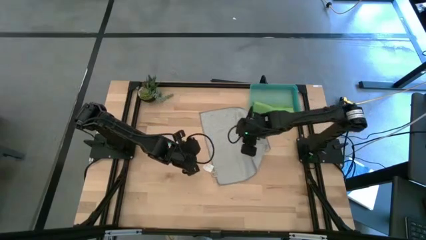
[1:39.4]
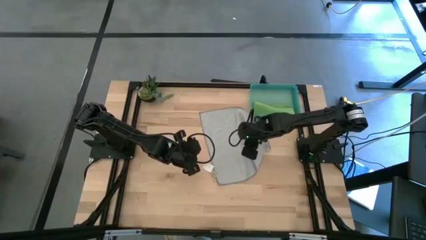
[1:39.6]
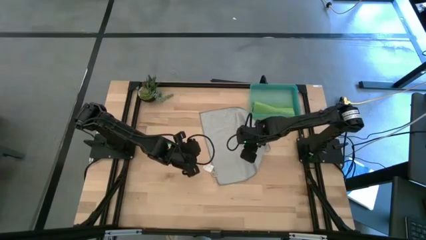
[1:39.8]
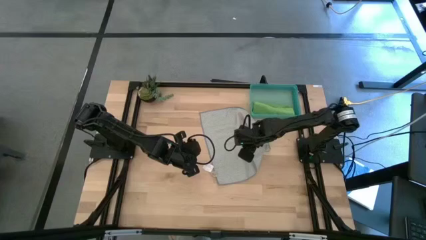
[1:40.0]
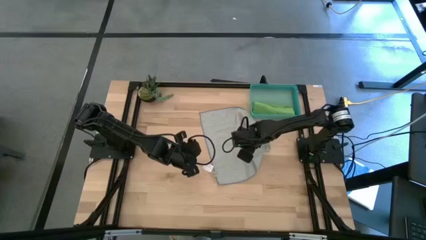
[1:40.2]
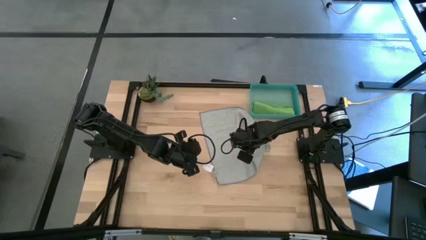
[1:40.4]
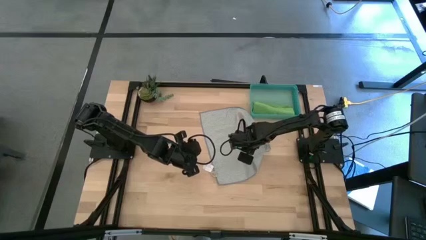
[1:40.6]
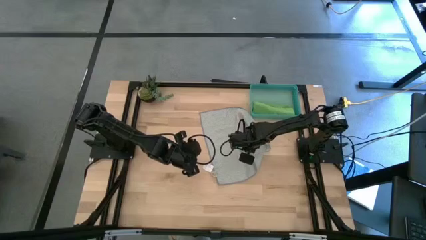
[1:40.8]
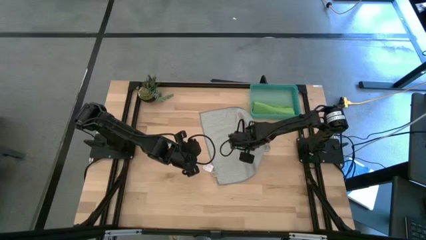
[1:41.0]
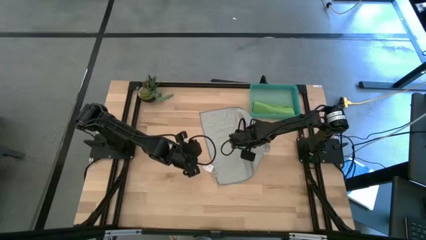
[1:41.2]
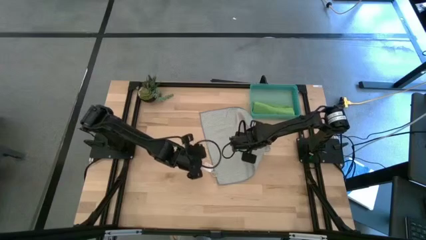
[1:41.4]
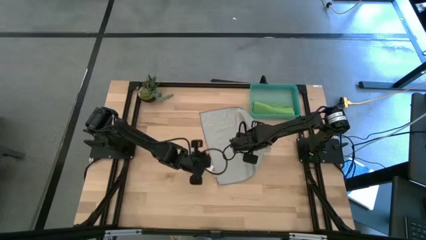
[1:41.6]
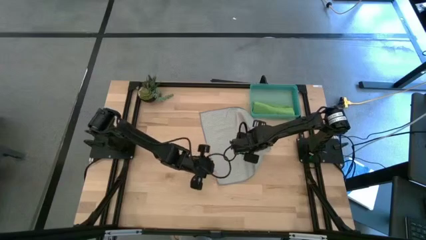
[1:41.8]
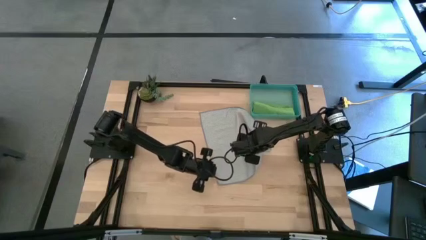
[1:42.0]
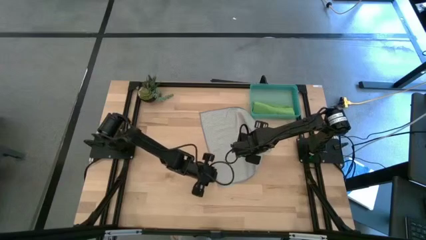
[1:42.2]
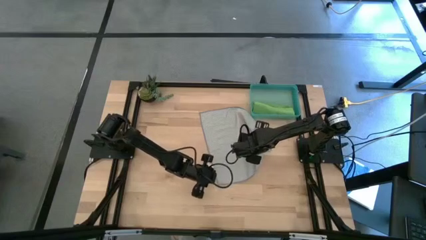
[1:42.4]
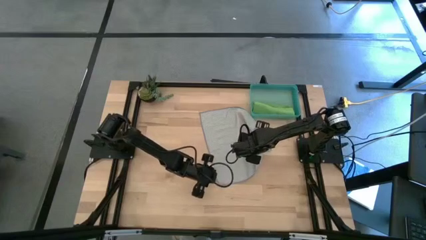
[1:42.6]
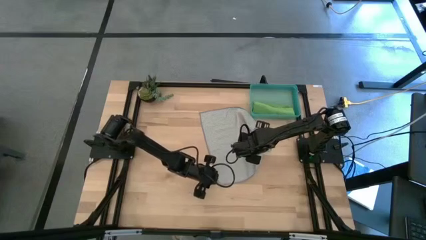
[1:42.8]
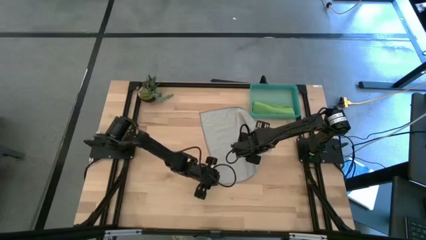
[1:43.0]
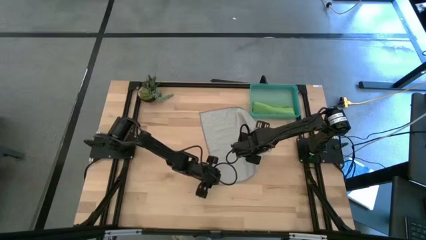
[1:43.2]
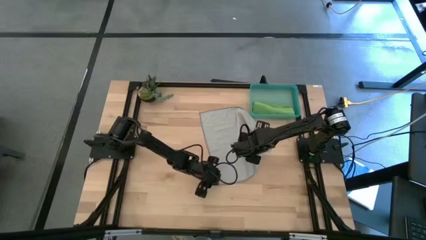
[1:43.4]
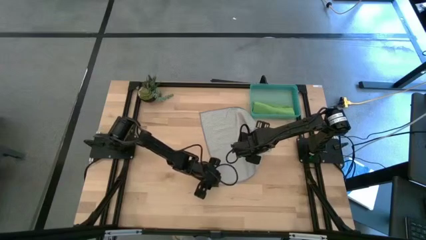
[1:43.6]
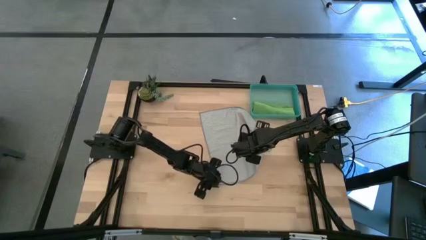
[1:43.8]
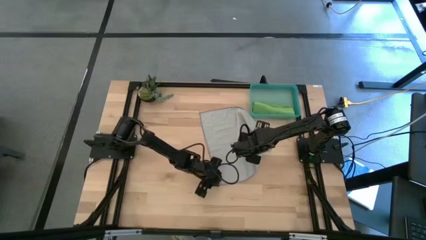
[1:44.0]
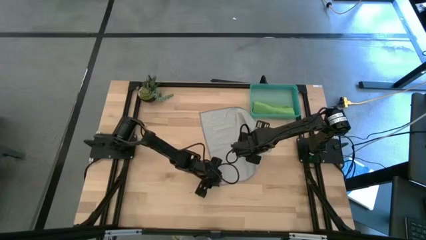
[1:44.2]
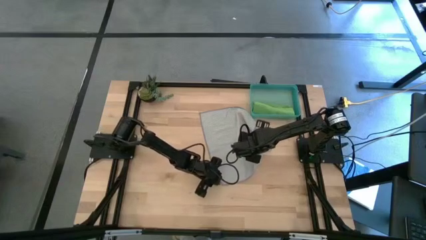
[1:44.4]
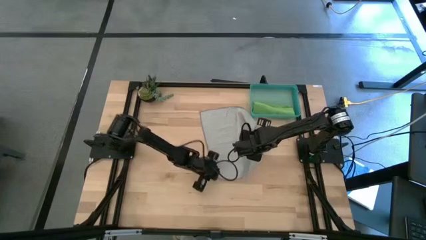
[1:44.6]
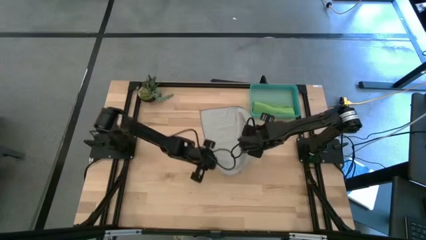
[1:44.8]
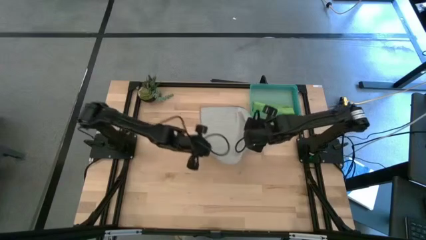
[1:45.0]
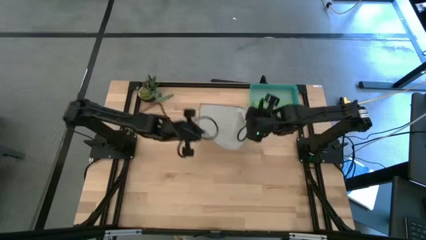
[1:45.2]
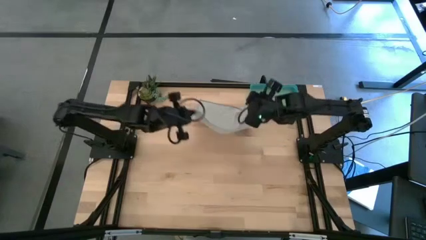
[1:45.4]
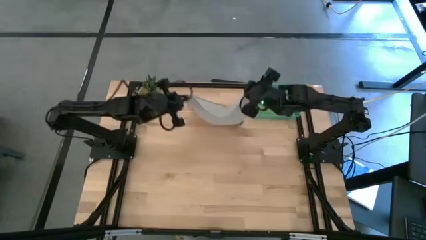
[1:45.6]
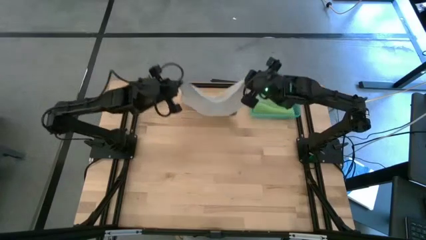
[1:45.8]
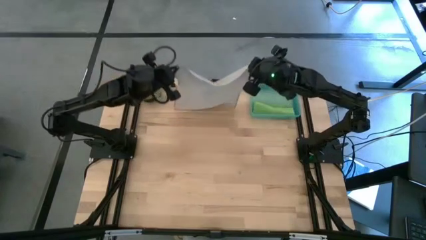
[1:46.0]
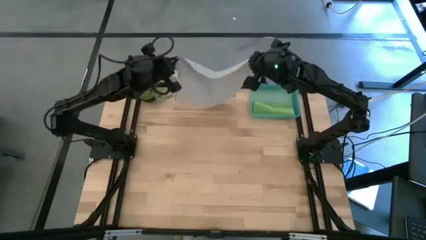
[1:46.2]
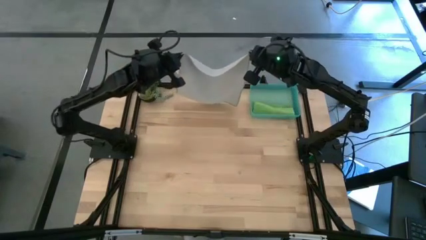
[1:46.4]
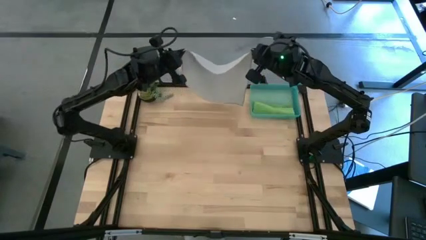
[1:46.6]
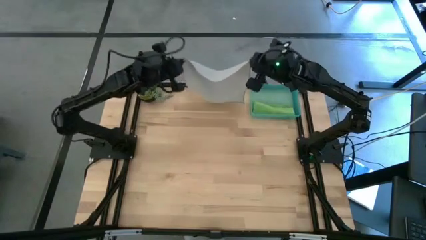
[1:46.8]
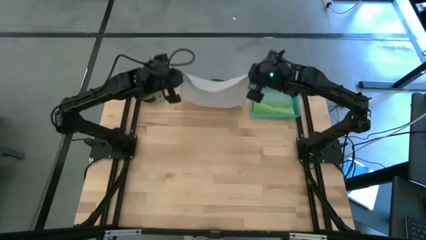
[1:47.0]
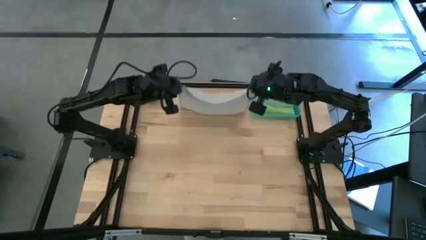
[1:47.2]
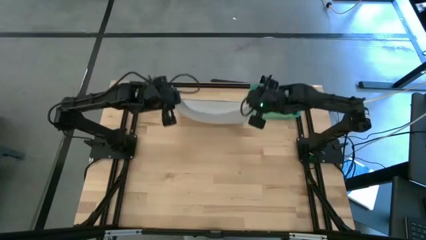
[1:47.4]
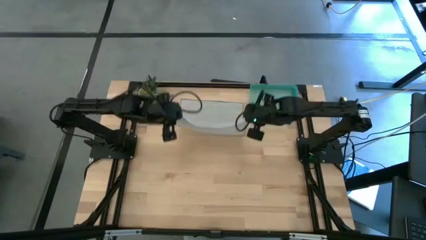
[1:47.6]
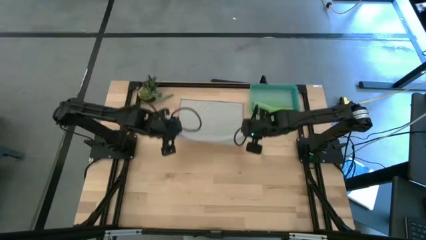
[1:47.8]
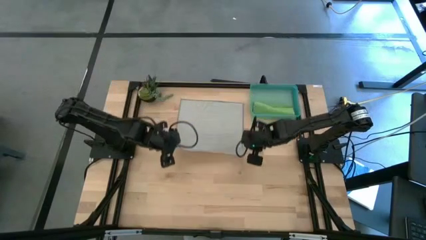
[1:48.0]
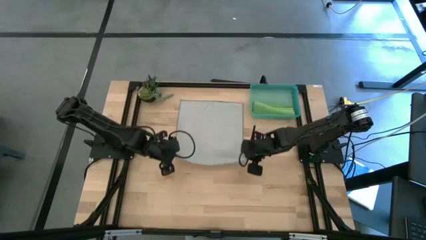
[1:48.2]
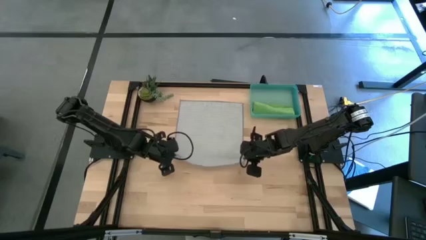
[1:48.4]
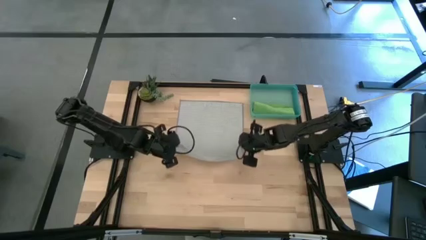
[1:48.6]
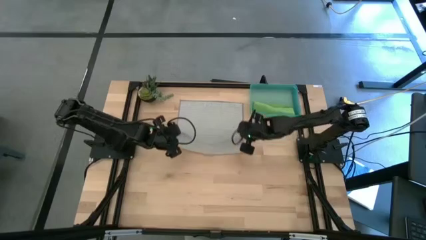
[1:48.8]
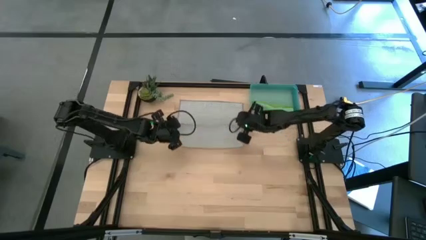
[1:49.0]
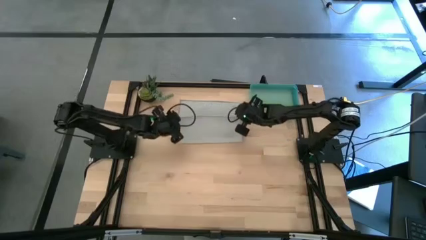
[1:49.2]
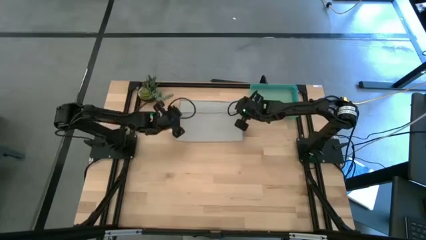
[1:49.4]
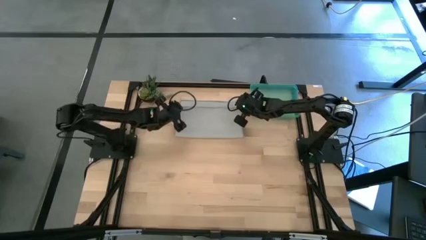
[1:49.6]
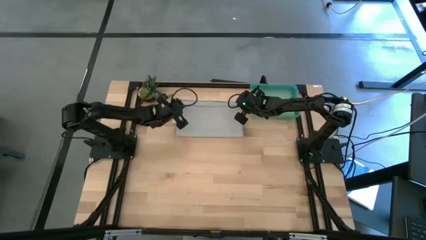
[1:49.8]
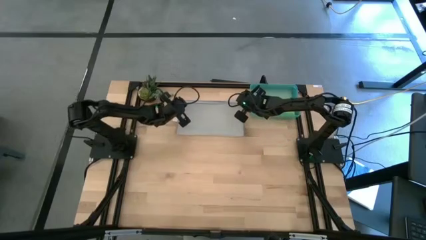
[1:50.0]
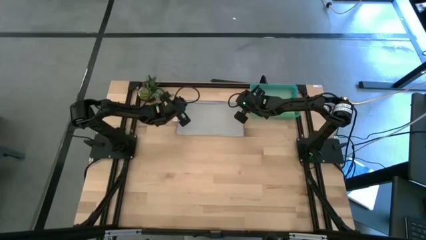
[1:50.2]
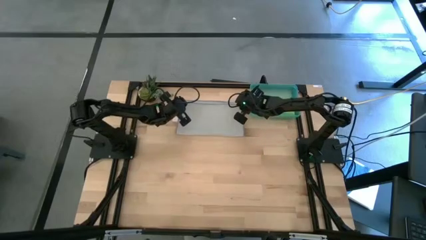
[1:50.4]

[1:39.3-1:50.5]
Task: Roll microfiber towels into tight, uniform cylinder then place into a basket
Fold the gray microfiber cloth
